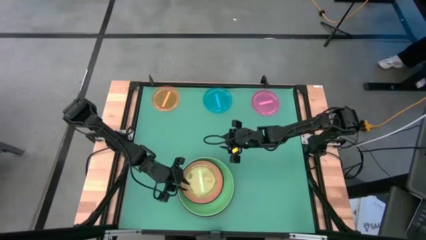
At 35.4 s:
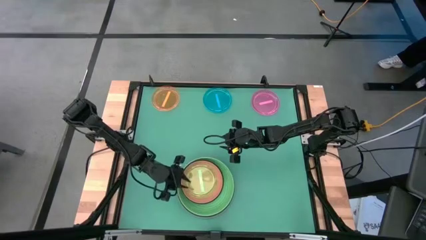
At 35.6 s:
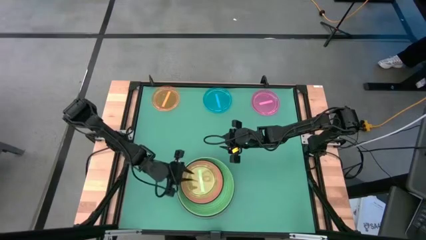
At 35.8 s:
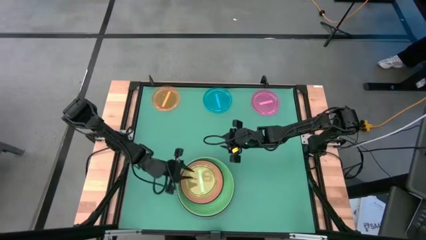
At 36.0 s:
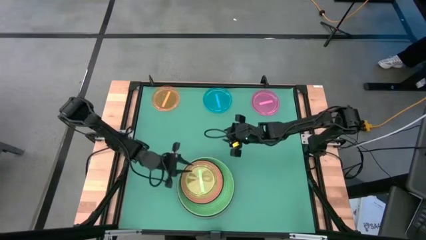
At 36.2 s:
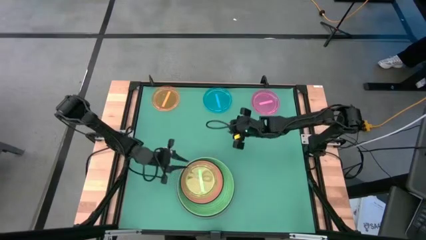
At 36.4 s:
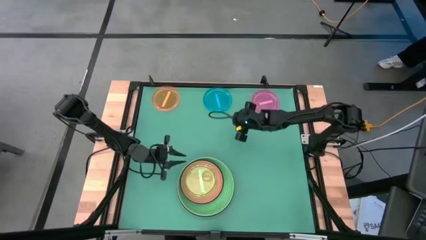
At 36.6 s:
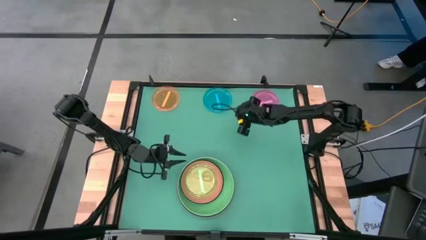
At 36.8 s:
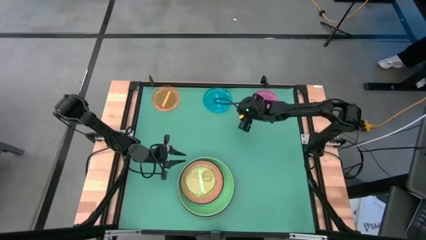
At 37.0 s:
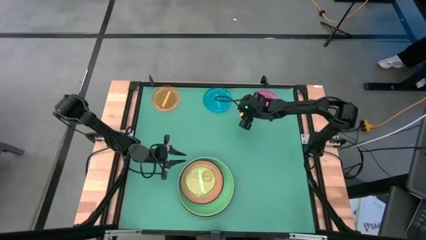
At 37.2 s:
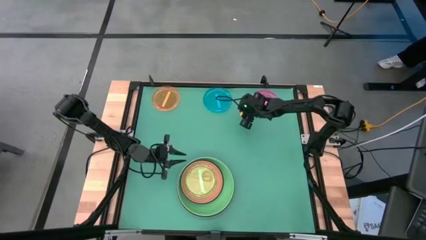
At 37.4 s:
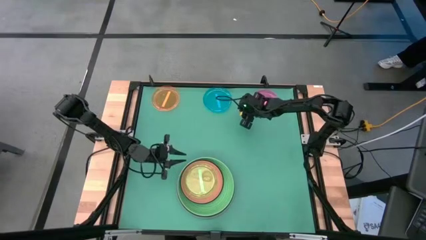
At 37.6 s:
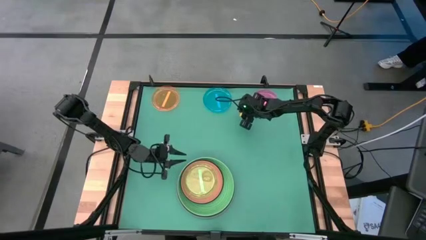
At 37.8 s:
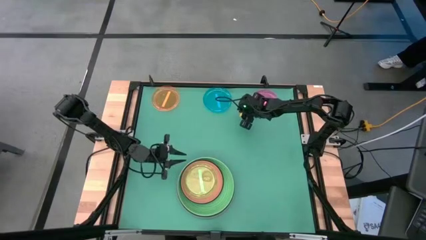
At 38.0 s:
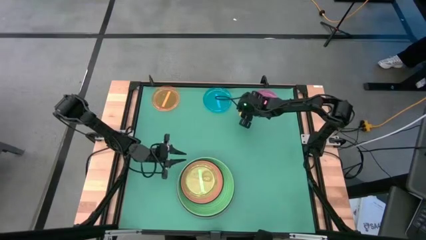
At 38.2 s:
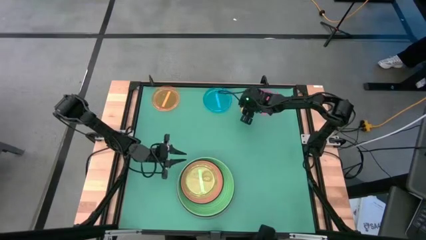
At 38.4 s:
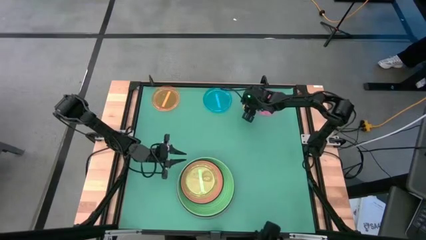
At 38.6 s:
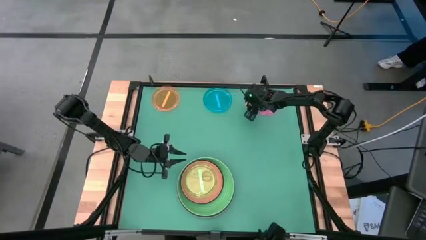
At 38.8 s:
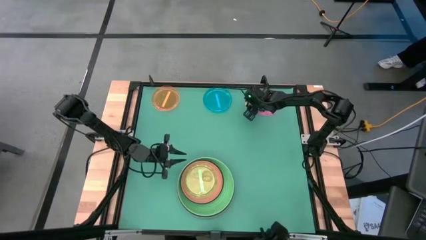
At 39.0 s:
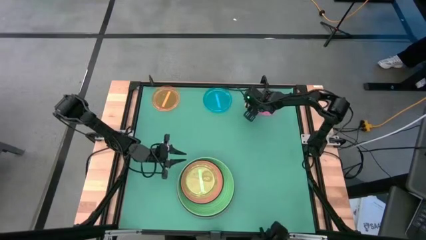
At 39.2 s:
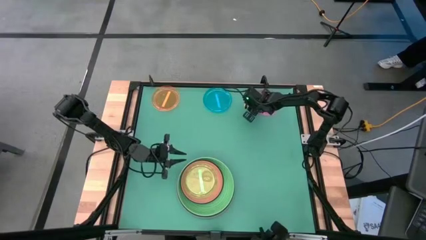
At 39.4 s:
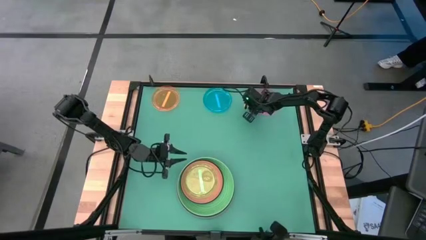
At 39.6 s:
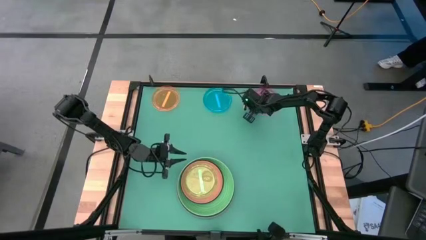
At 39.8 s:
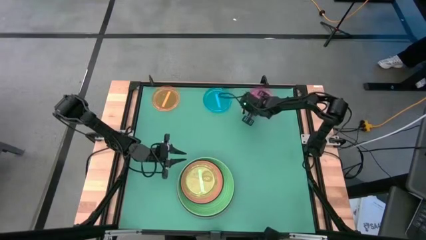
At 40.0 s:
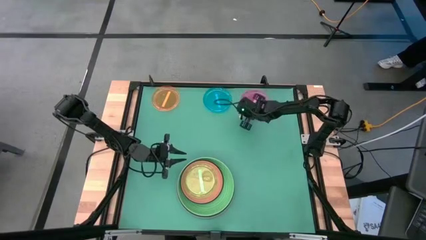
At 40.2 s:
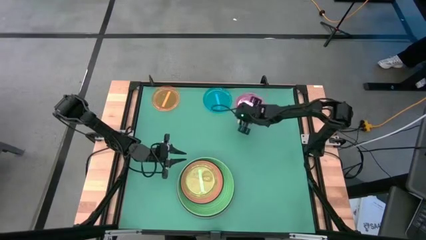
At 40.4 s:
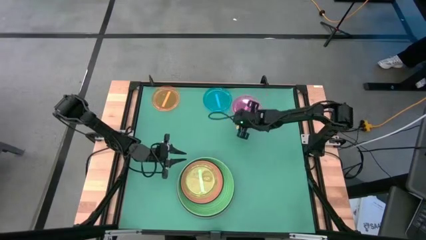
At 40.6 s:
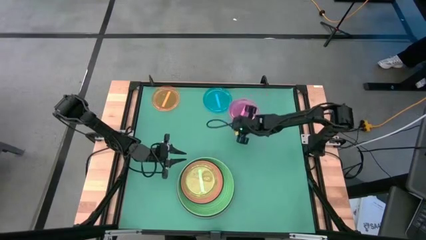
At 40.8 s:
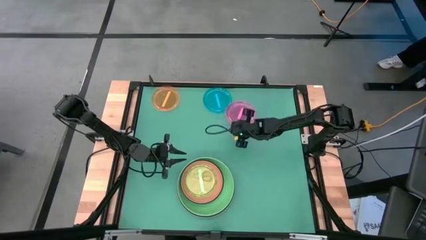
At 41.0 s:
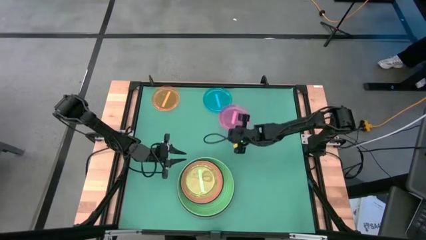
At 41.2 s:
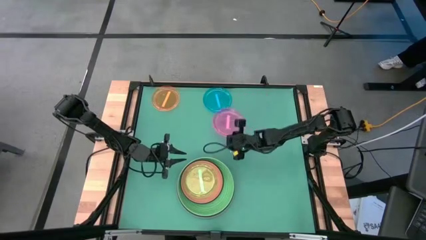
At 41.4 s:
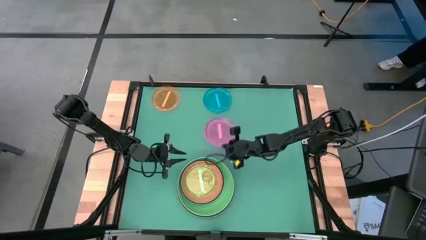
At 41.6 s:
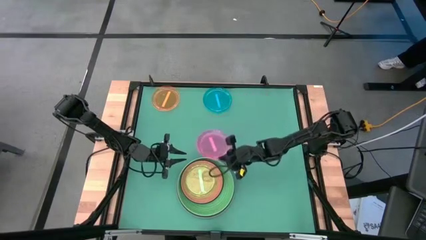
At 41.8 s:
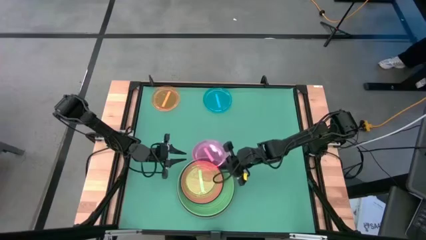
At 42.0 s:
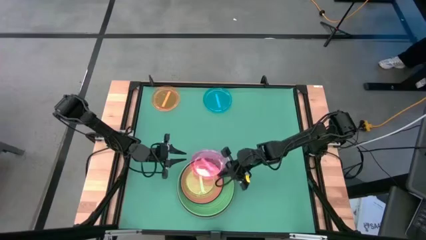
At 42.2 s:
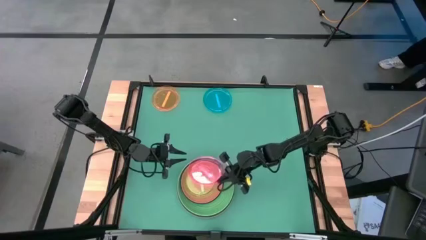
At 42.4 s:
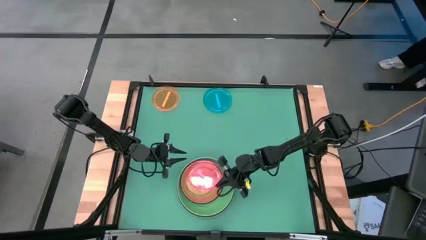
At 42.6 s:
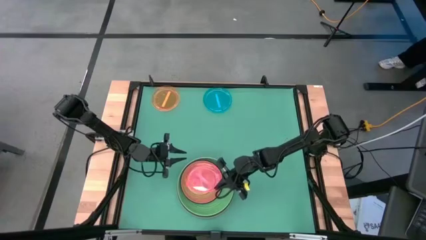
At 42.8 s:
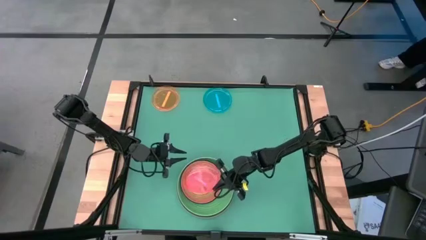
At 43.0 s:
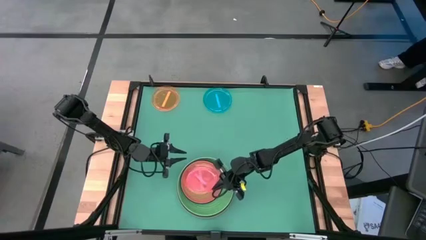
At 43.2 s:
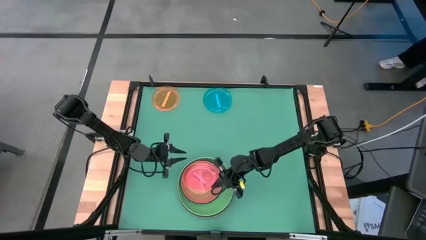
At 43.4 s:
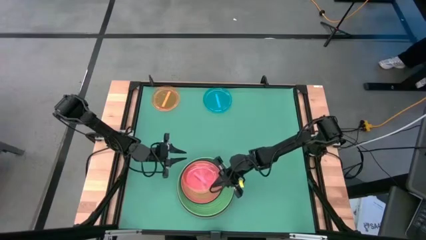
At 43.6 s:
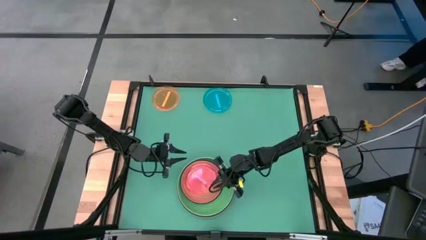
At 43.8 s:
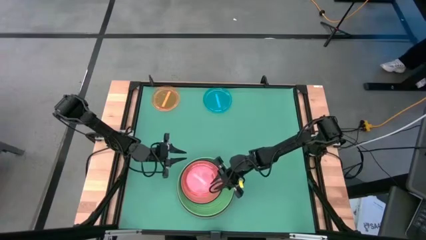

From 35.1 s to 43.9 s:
Task: Stack plastic plates
Stack the transparent pink plate on top of the transparent green plate

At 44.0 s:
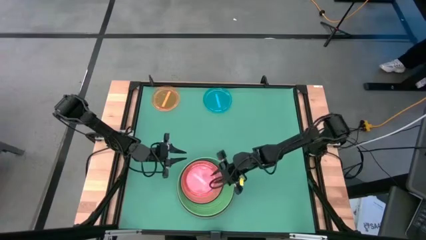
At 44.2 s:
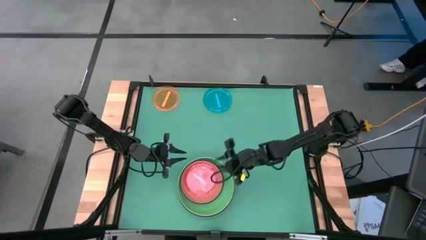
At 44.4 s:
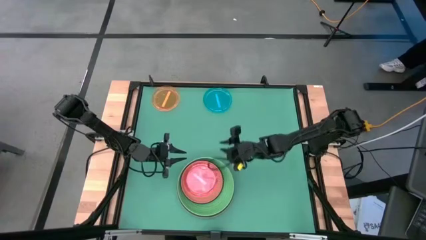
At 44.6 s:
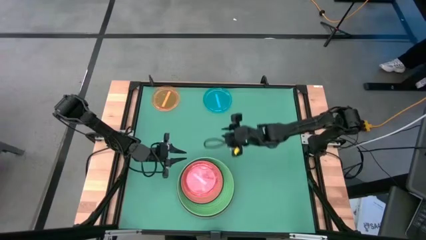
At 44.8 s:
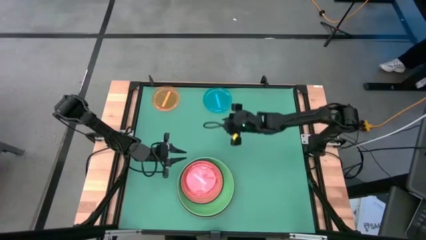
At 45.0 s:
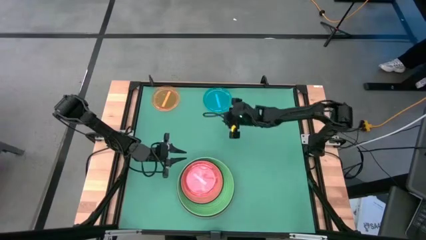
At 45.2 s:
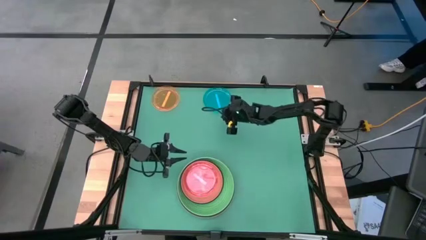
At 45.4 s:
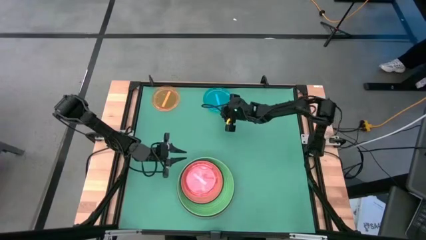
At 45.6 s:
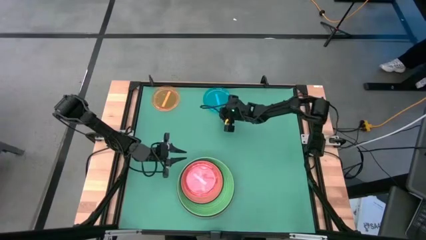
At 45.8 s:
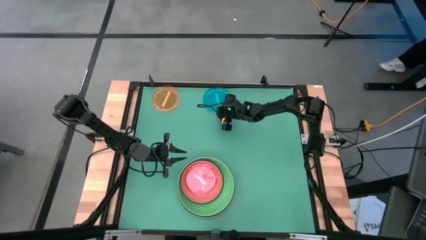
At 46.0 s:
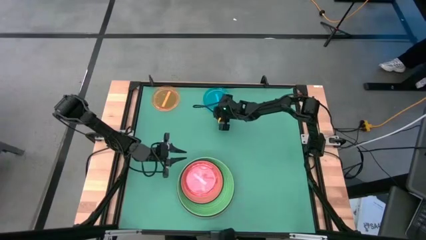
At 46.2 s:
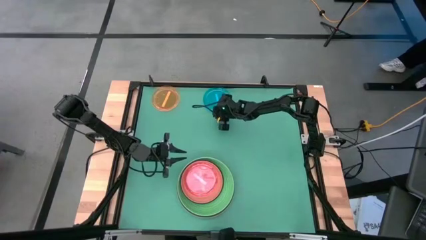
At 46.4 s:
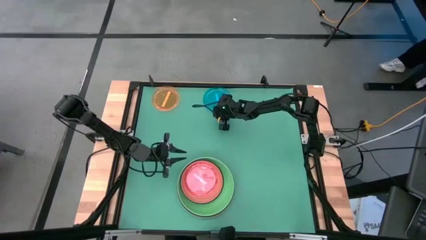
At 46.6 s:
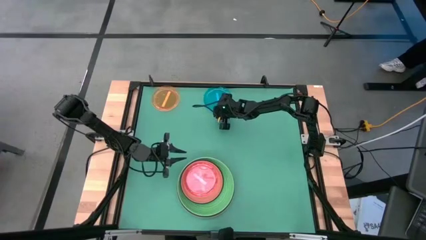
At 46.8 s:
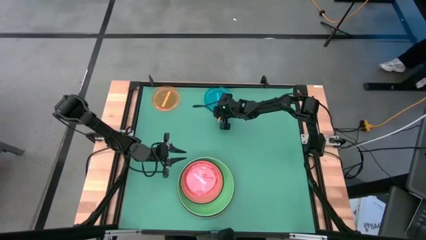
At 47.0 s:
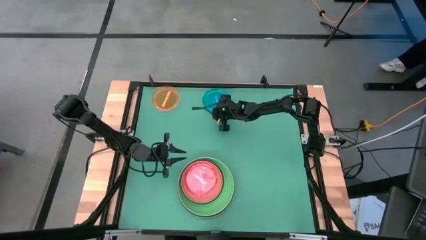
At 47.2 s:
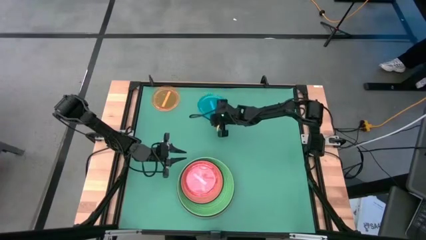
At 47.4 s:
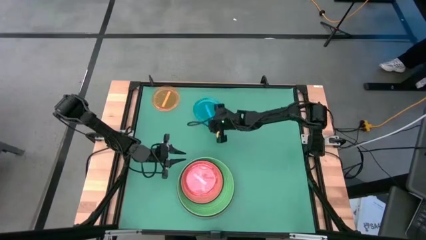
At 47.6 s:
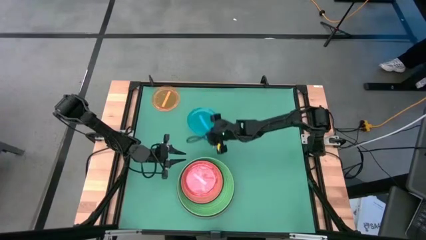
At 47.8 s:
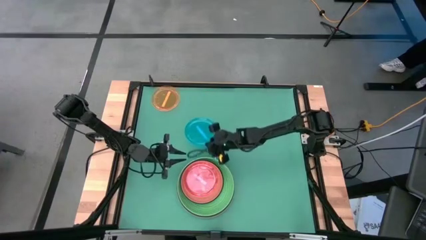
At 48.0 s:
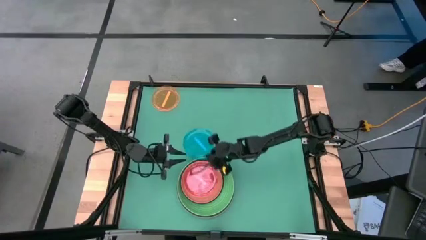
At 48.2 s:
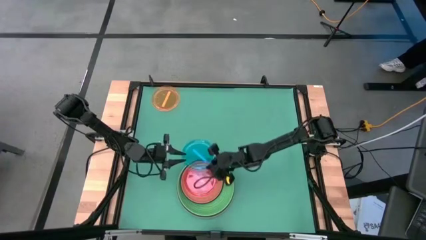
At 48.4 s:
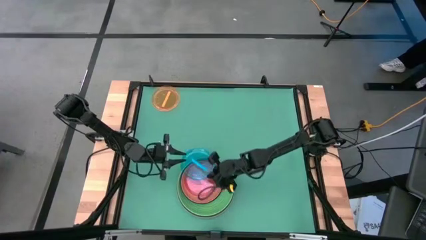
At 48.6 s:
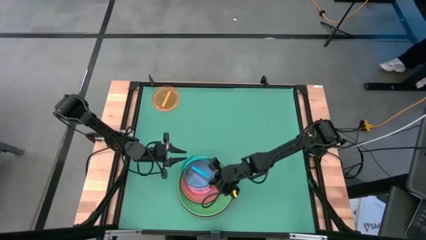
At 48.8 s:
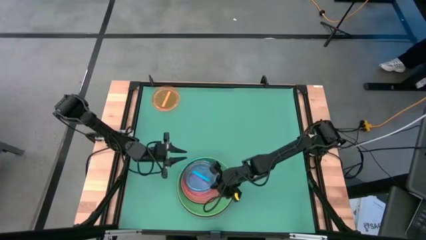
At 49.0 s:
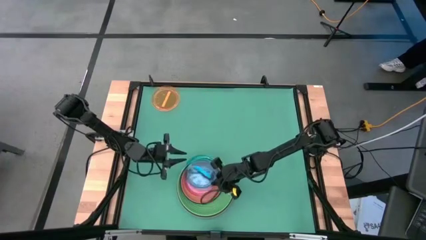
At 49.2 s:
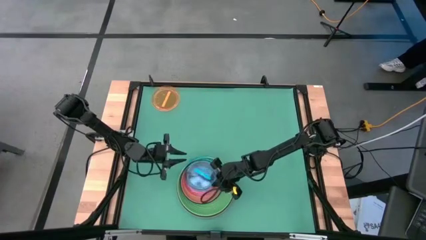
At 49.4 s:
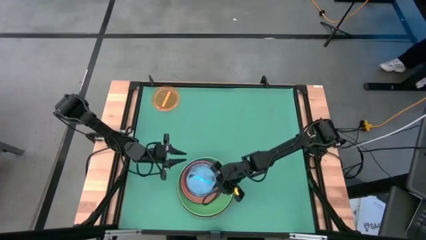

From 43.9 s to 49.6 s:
Stack the transparent blue plate on top of the transparent pink plate
